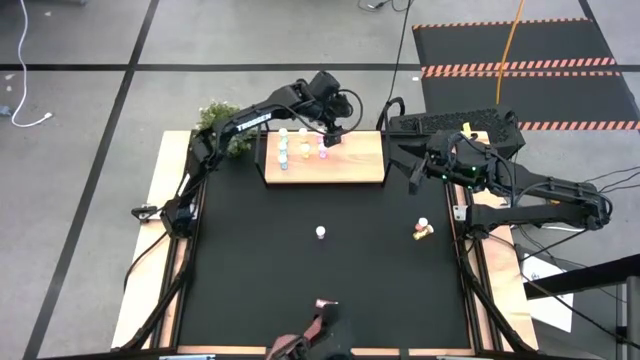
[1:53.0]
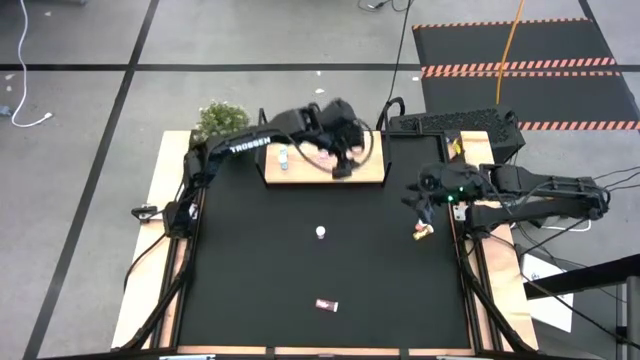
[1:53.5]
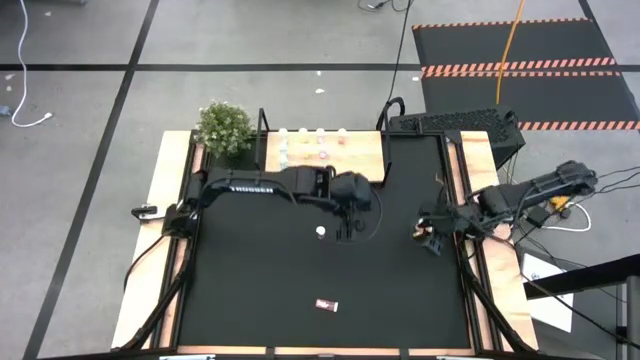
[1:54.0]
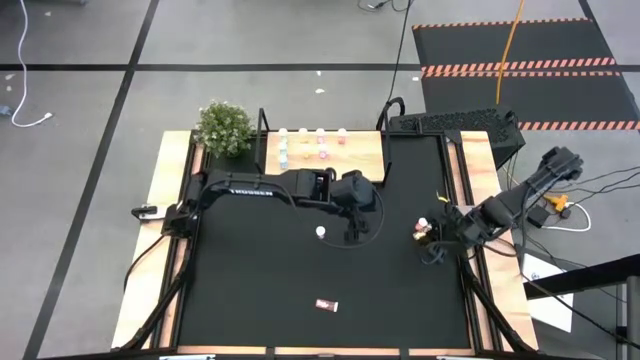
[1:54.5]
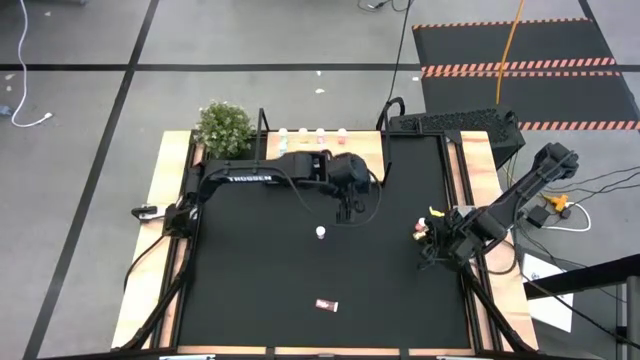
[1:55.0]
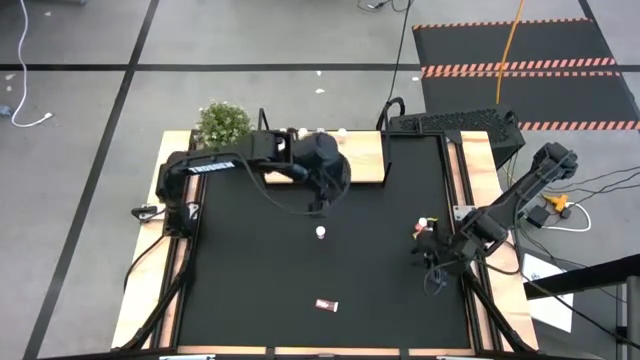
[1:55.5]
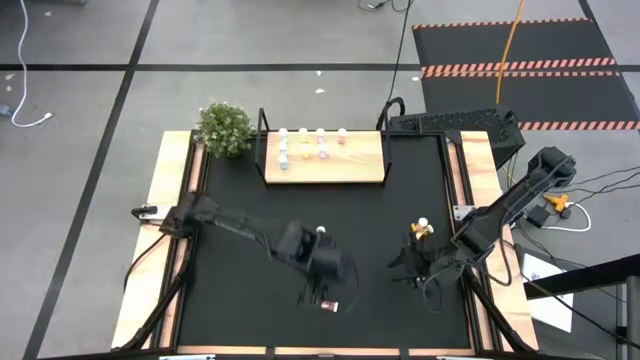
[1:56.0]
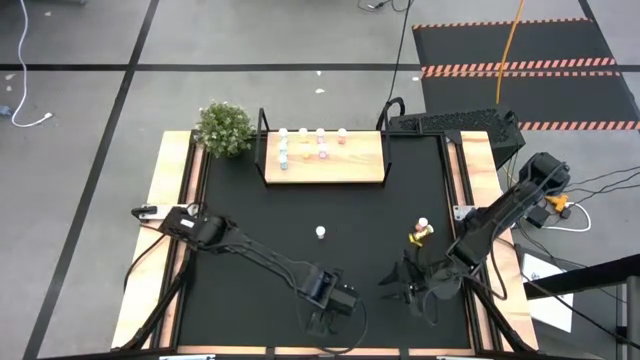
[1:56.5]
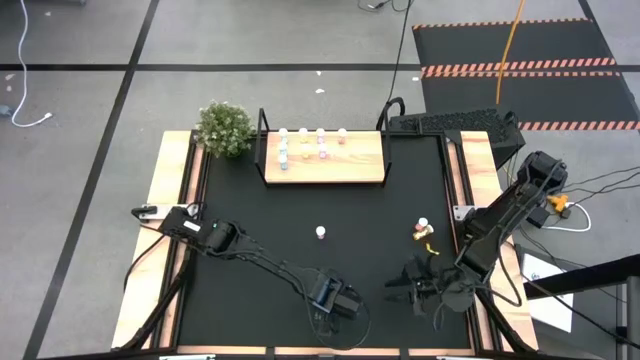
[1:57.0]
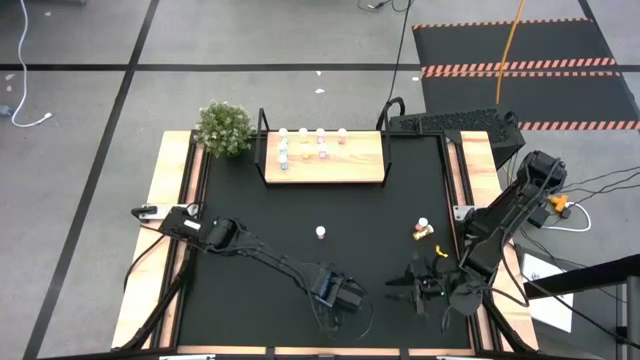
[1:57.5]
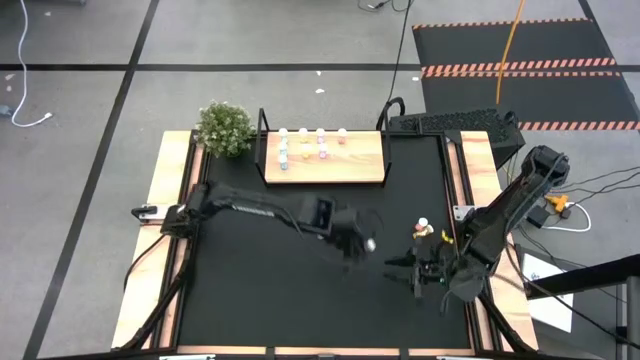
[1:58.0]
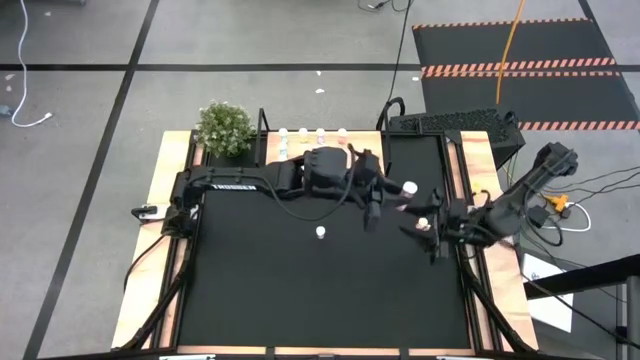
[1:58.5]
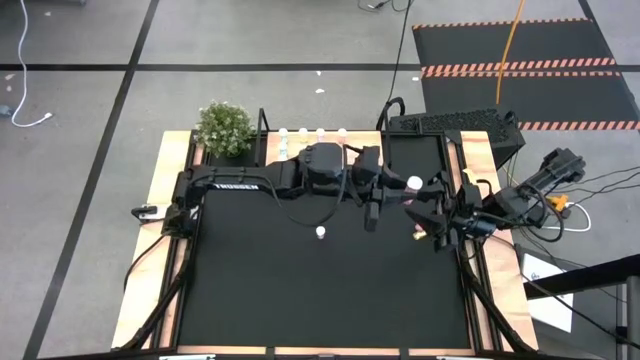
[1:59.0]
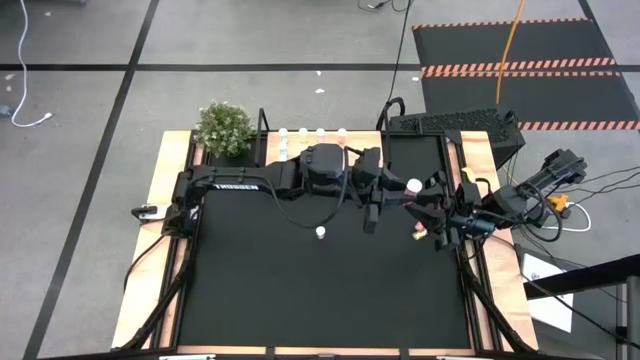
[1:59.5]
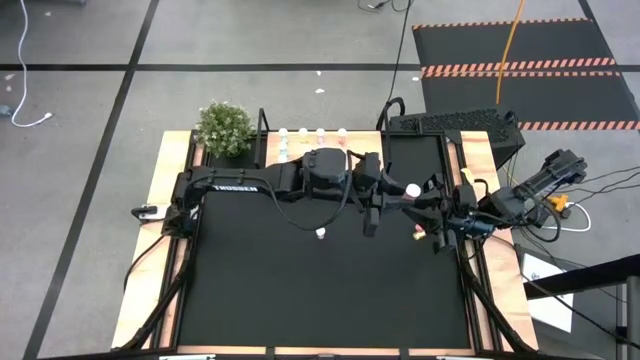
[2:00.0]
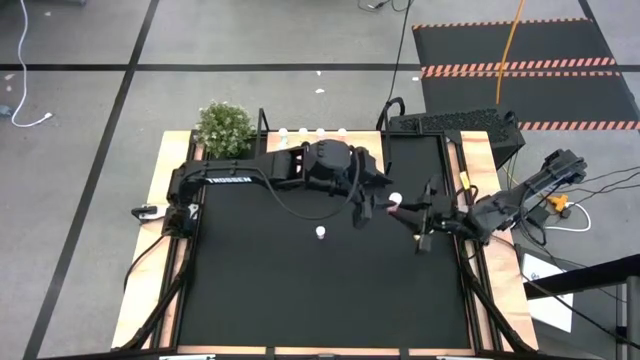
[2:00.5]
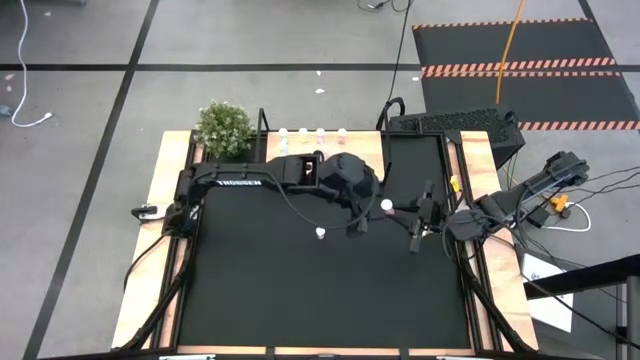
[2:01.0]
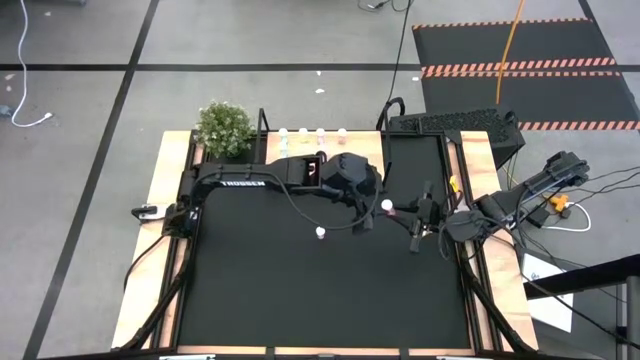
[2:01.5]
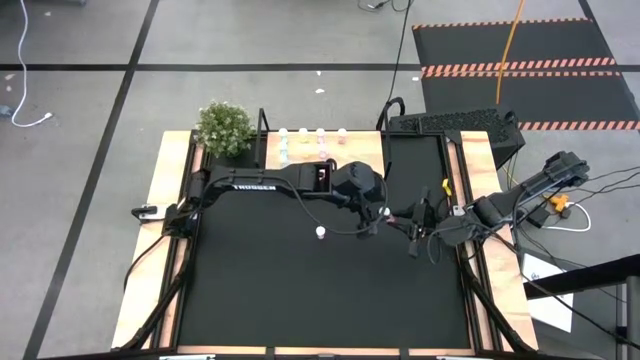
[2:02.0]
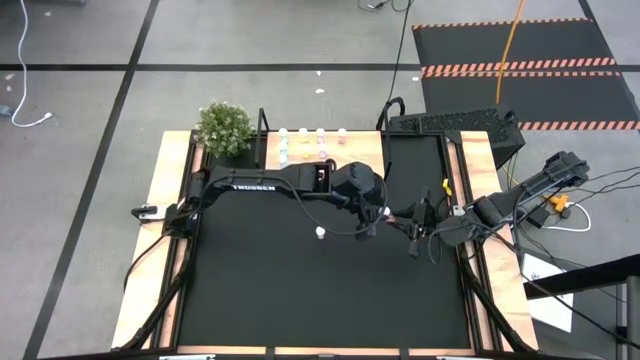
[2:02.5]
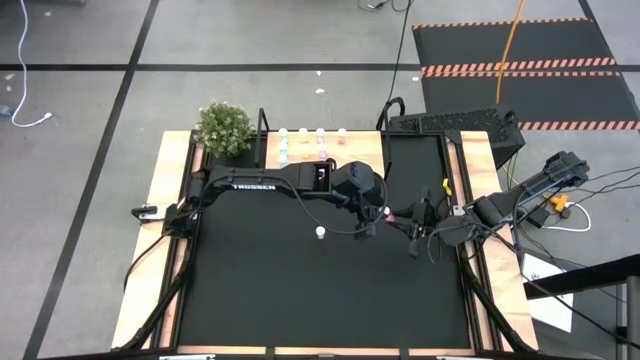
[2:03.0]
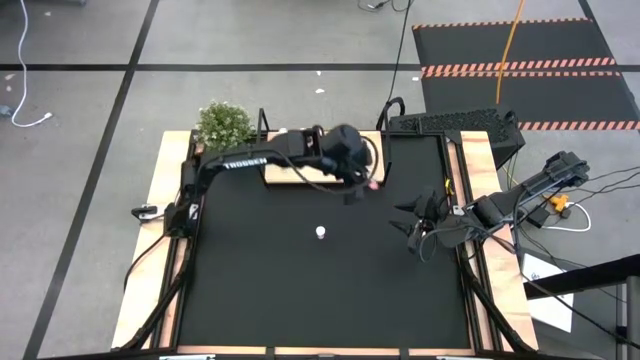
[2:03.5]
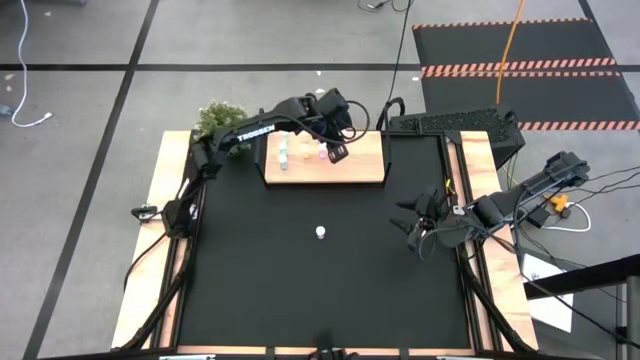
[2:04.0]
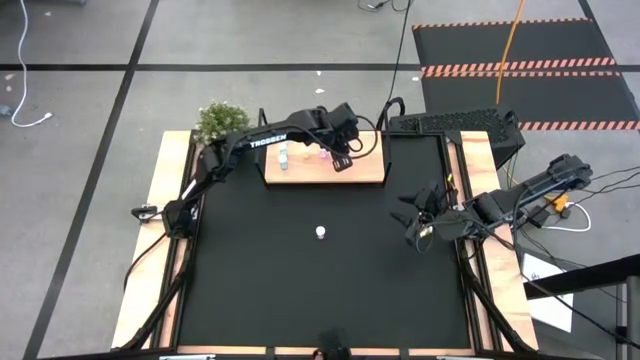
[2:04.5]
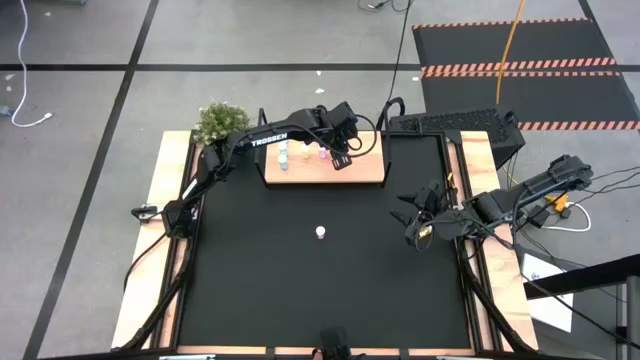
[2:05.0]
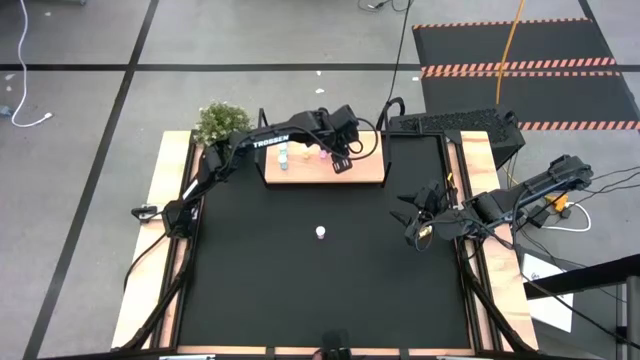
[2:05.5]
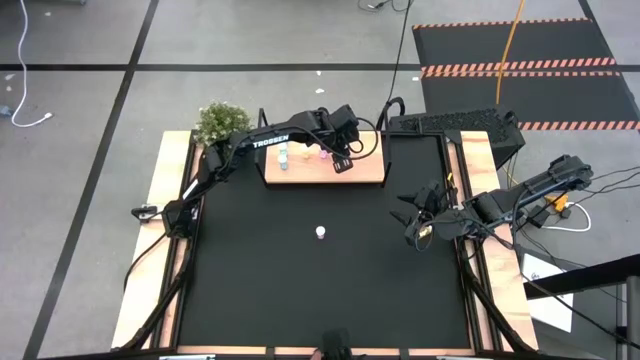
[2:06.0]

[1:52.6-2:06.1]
Task: Pick and place medicine bottles onto shelf by color
Put the bottom center orange pill bottle on the shelf

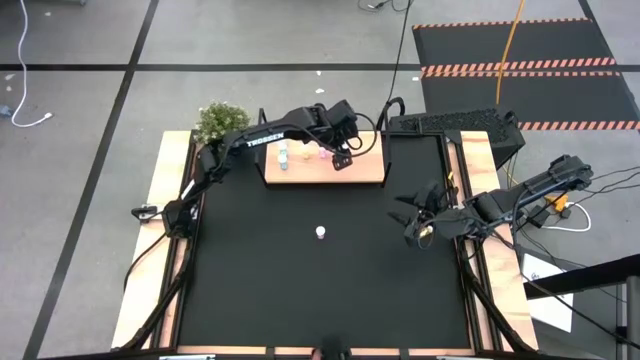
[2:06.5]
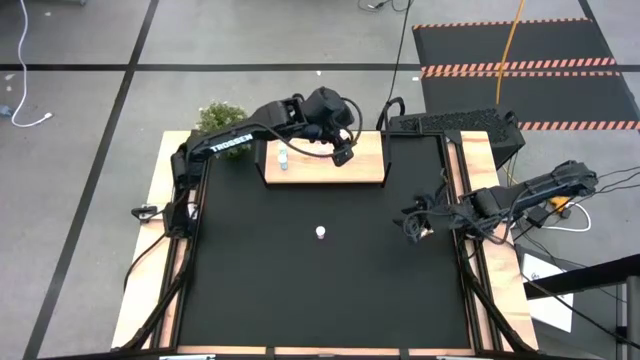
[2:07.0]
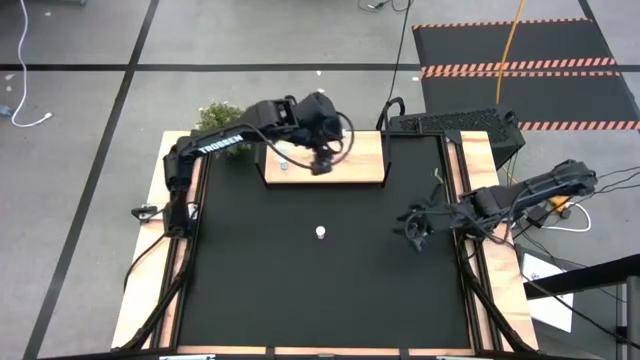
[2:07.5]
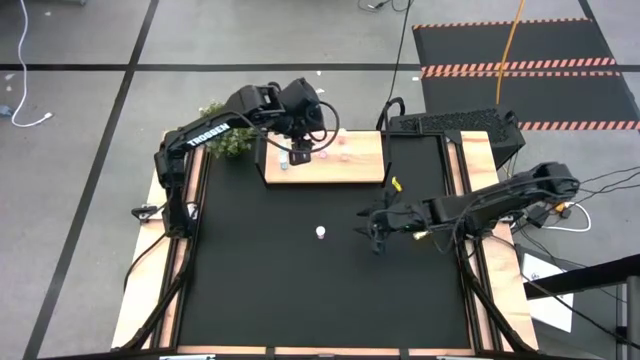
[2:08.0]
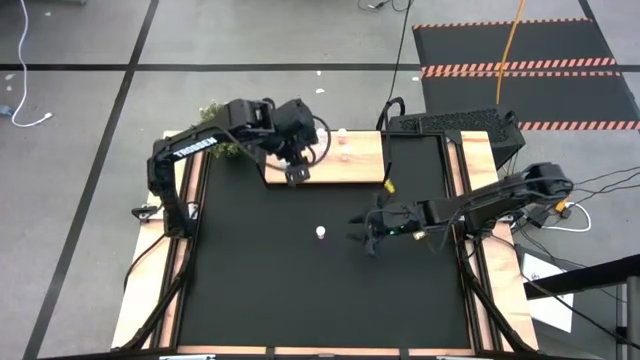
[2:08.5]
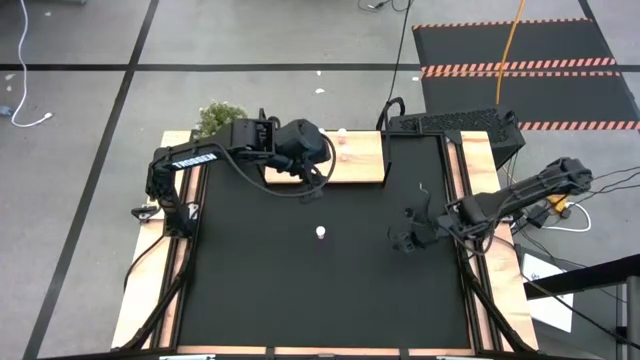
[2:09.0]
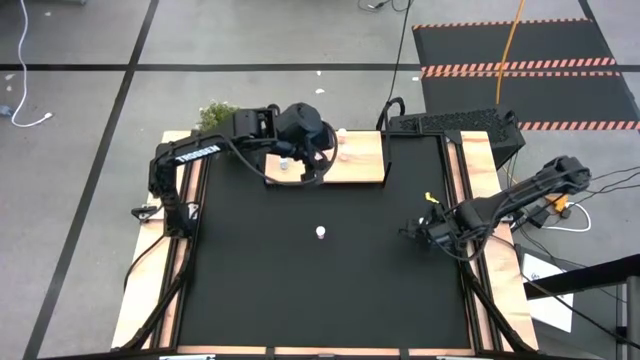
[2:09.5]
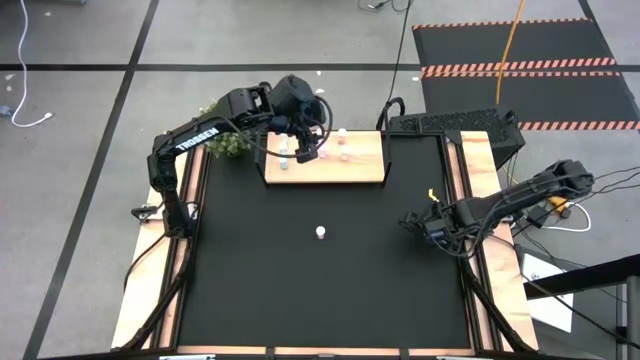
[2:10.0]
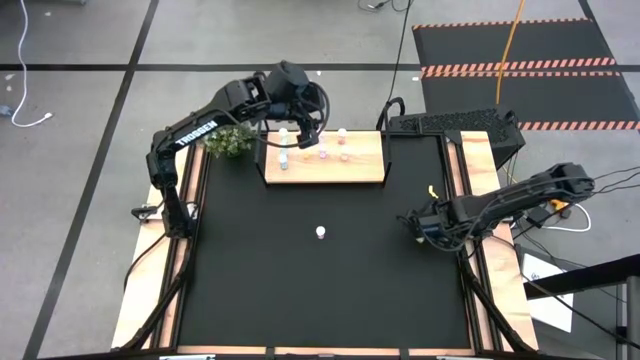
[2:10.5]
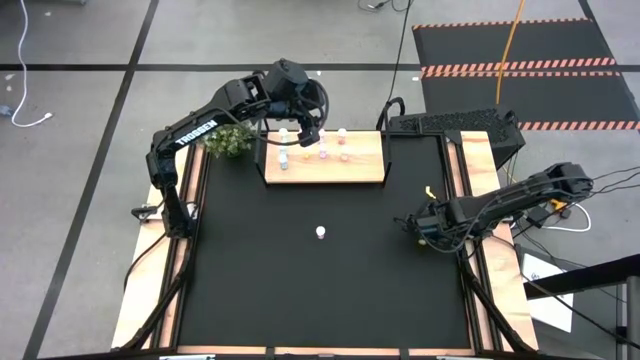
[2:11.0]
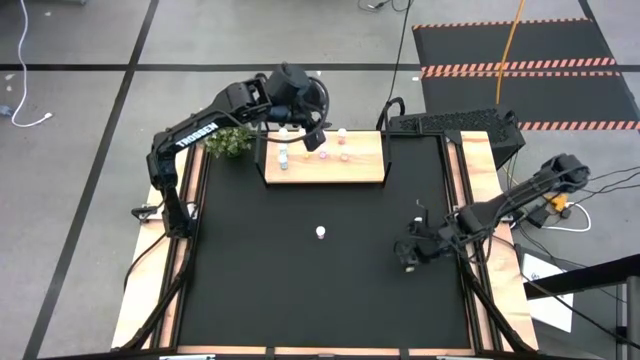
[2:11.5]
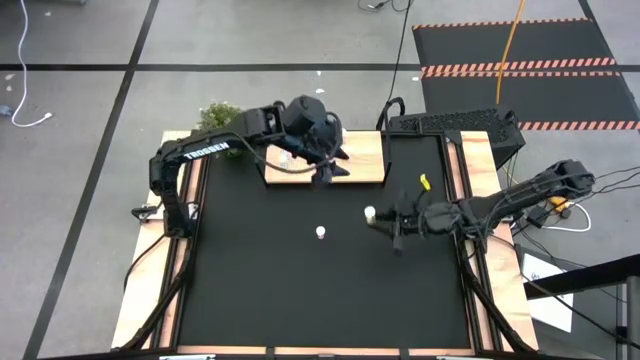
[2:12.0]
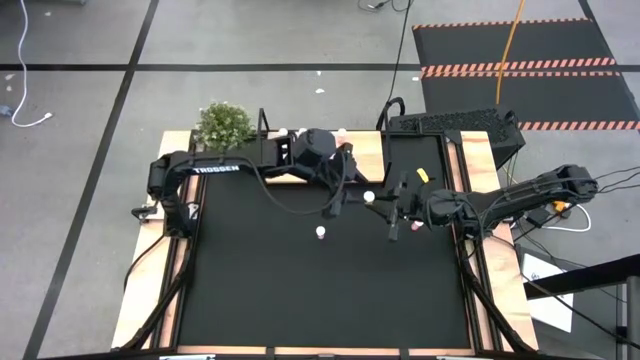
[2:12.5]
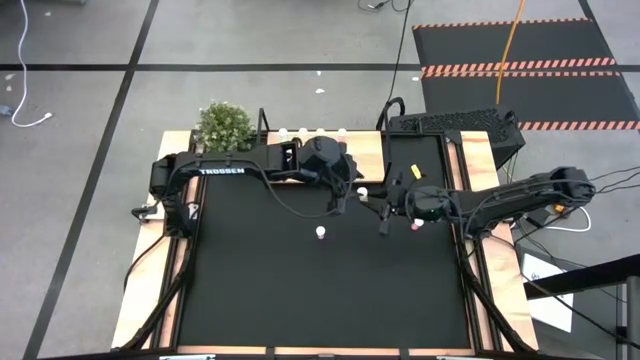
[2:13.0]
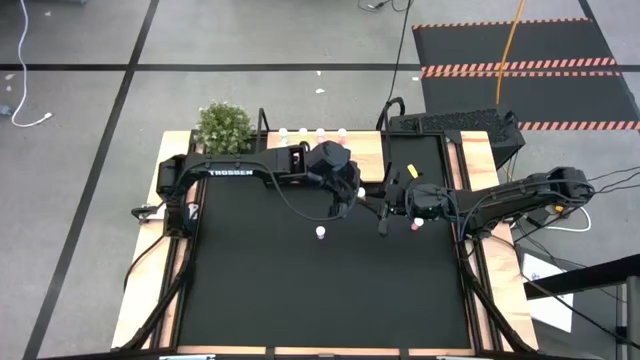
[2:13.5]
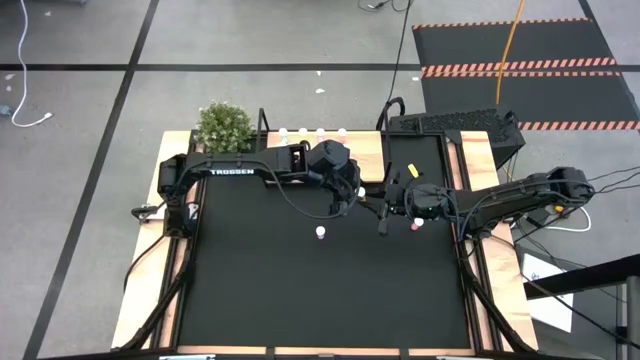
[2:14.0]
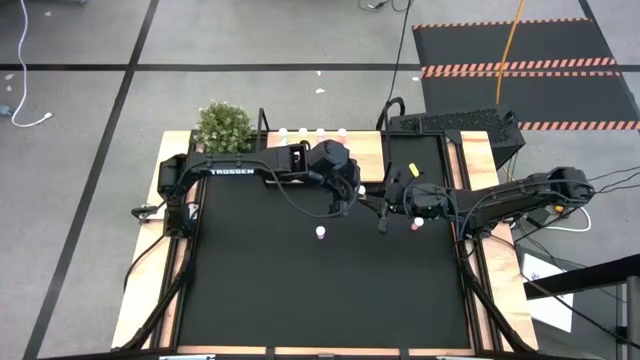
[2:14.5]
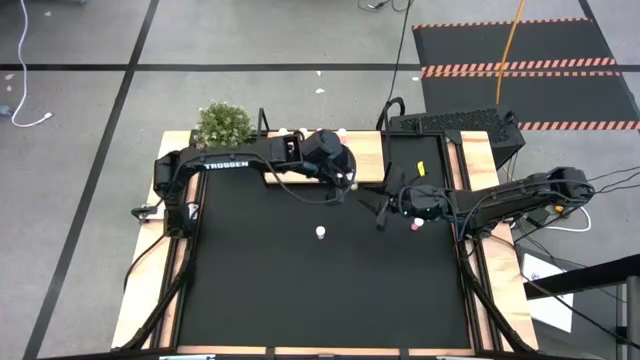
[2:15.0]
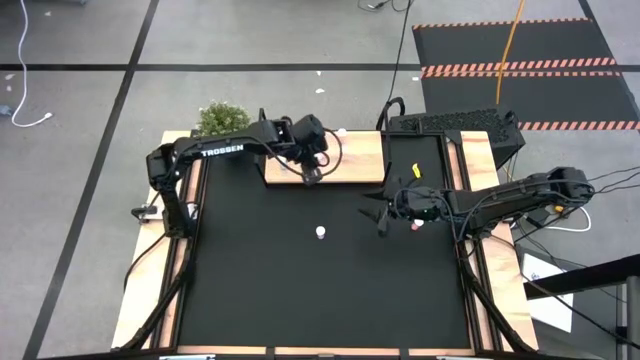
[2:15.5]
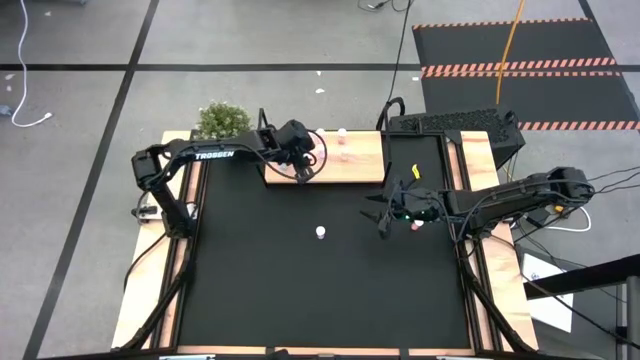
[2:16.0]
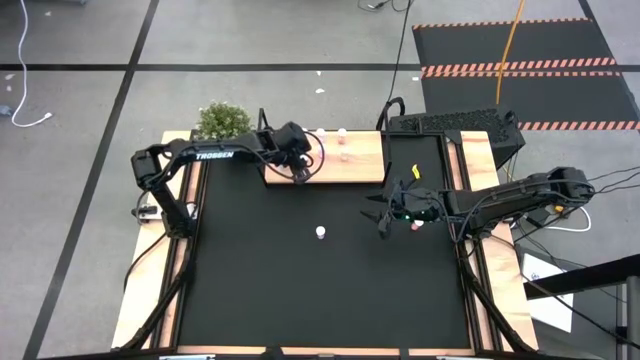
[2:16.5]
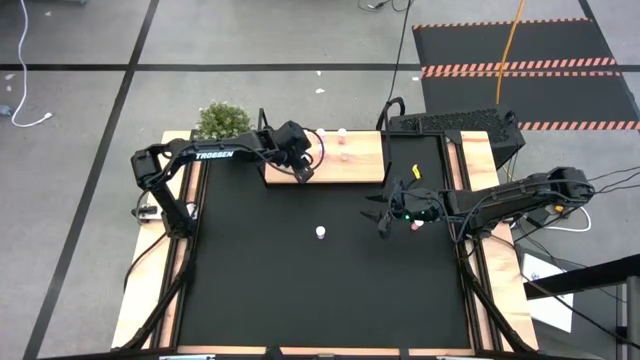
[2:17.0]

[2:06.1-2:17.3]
Put the yellow pill bottle on the shelf
